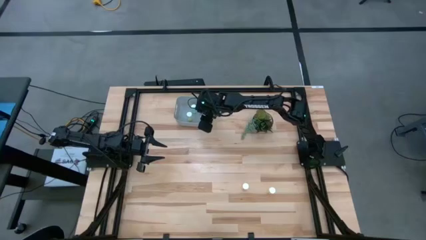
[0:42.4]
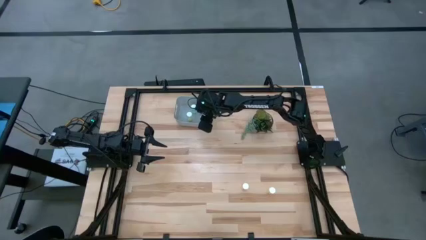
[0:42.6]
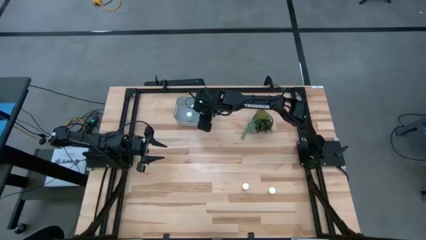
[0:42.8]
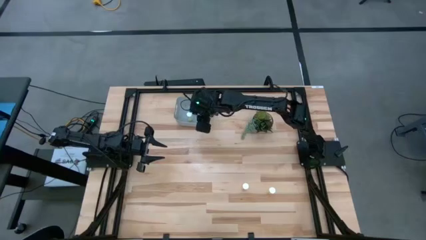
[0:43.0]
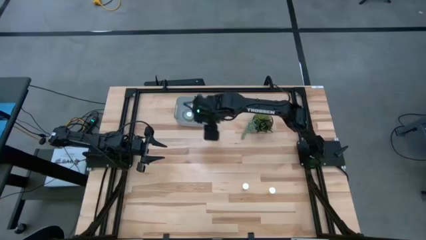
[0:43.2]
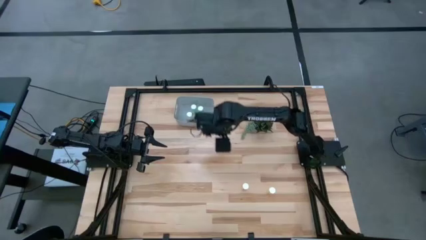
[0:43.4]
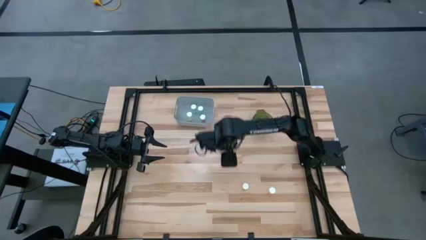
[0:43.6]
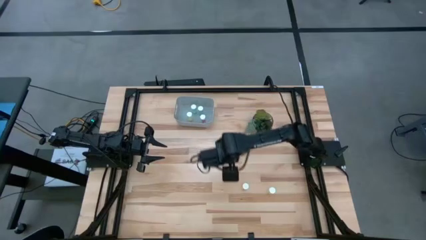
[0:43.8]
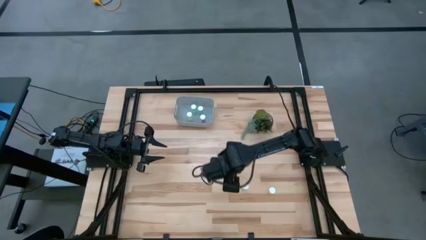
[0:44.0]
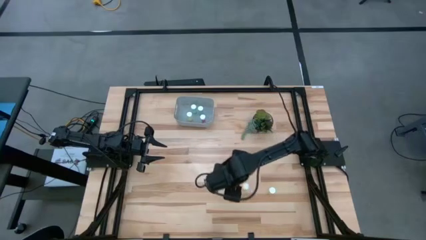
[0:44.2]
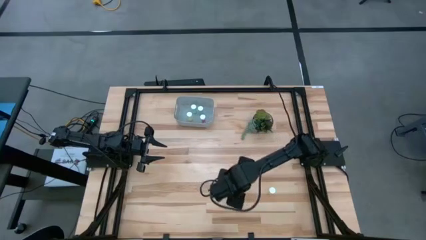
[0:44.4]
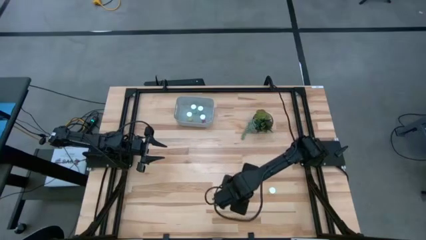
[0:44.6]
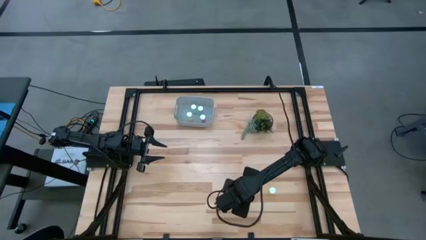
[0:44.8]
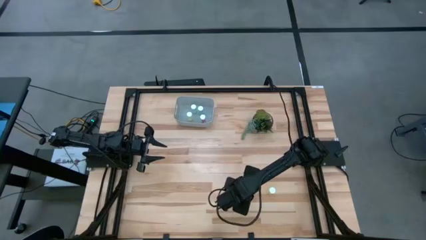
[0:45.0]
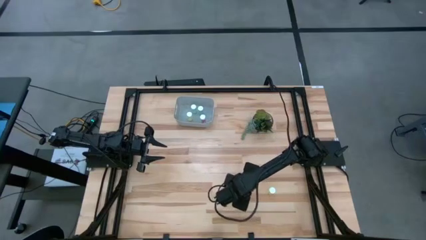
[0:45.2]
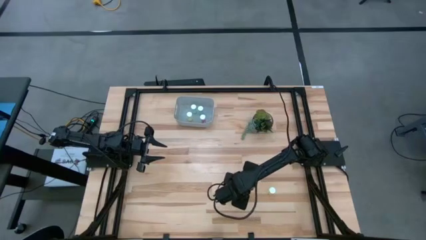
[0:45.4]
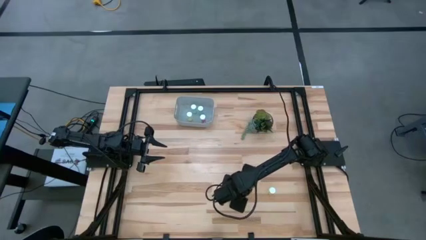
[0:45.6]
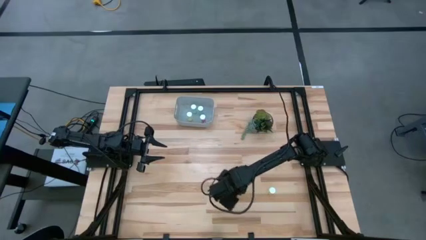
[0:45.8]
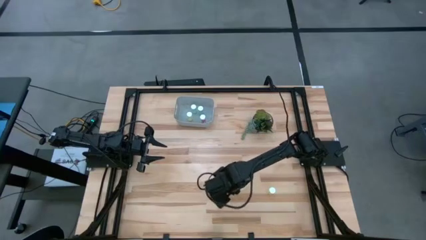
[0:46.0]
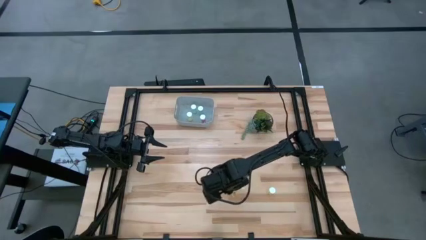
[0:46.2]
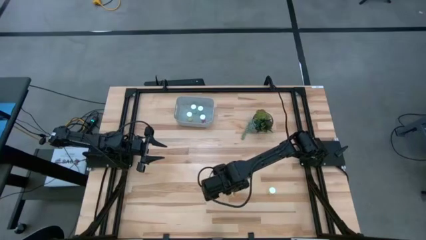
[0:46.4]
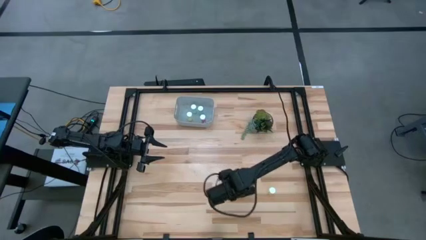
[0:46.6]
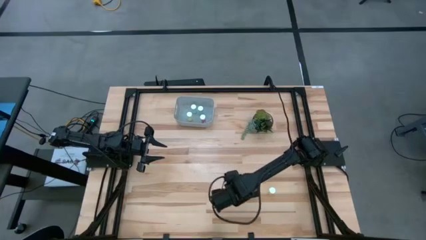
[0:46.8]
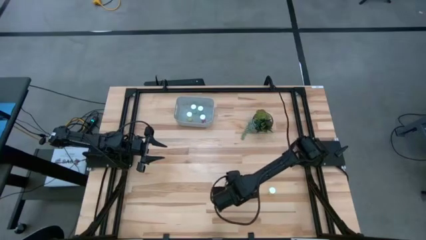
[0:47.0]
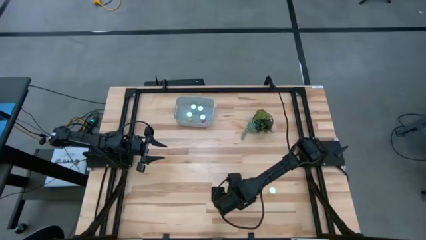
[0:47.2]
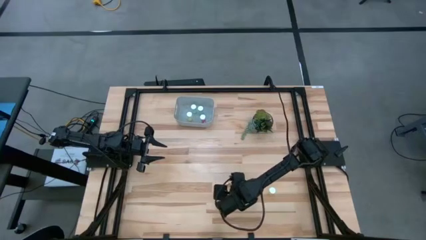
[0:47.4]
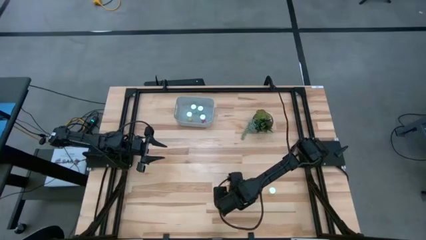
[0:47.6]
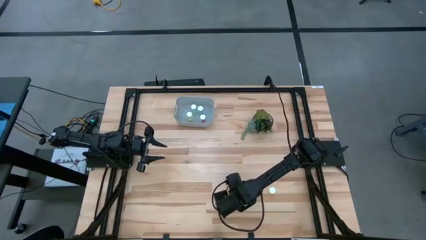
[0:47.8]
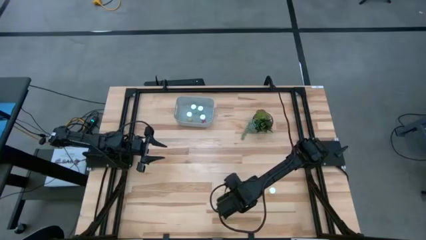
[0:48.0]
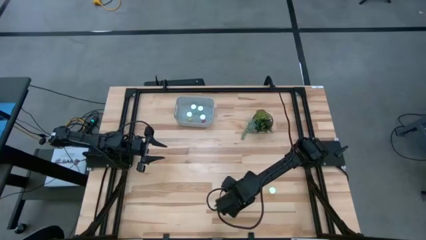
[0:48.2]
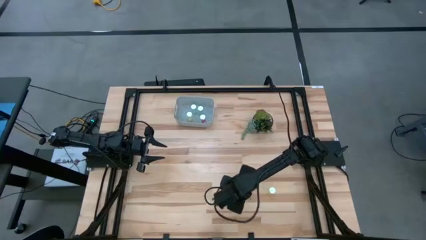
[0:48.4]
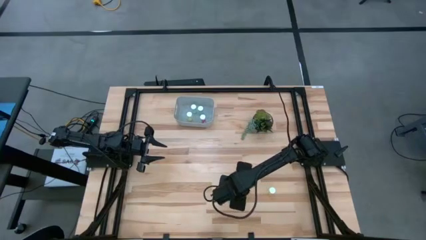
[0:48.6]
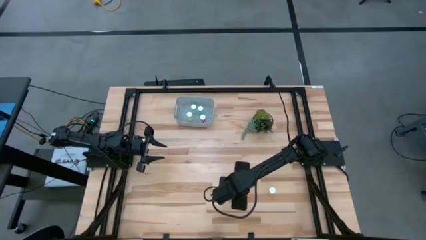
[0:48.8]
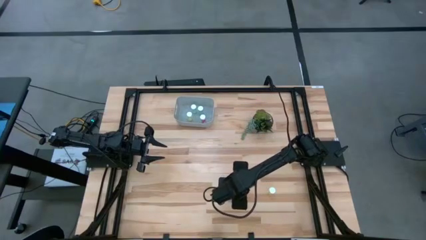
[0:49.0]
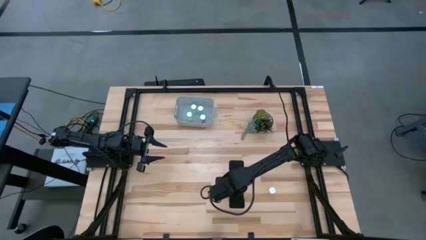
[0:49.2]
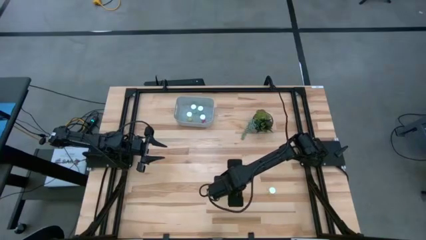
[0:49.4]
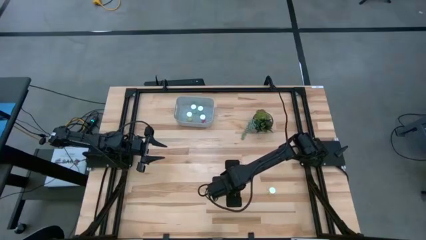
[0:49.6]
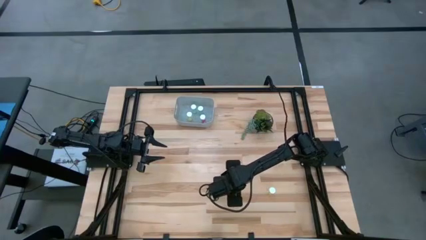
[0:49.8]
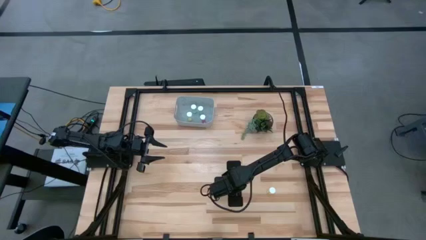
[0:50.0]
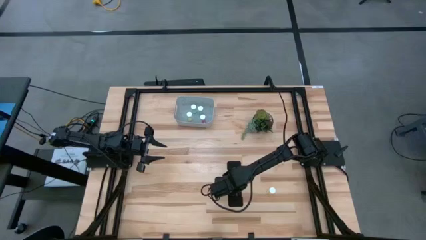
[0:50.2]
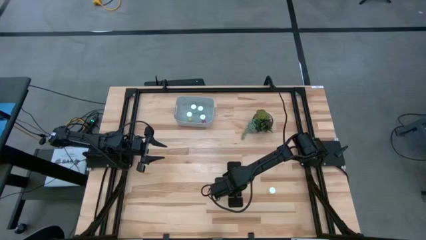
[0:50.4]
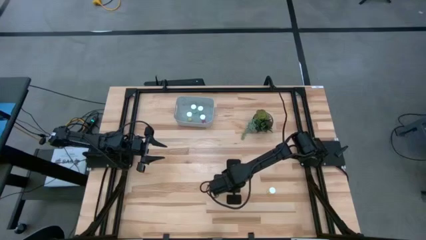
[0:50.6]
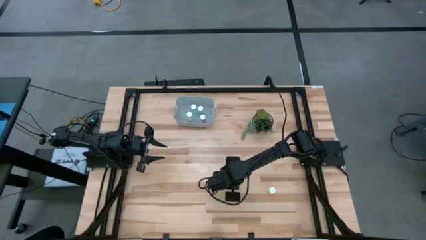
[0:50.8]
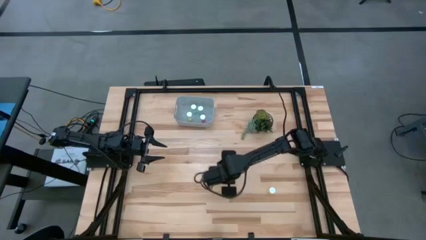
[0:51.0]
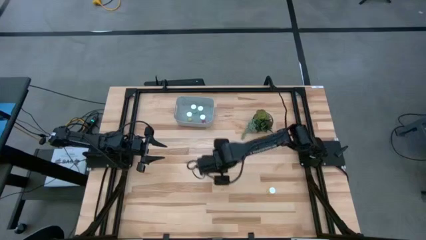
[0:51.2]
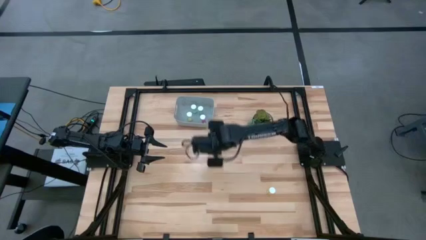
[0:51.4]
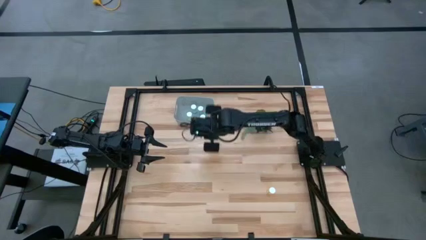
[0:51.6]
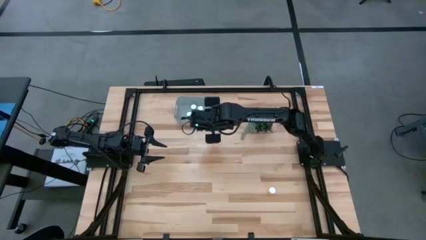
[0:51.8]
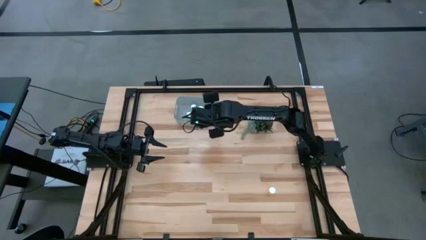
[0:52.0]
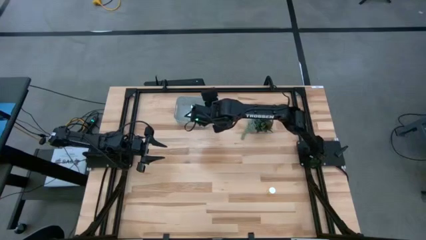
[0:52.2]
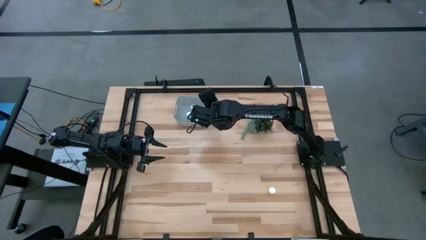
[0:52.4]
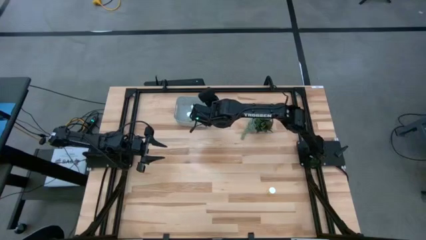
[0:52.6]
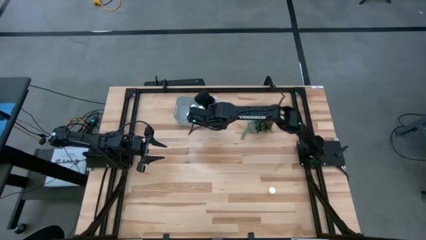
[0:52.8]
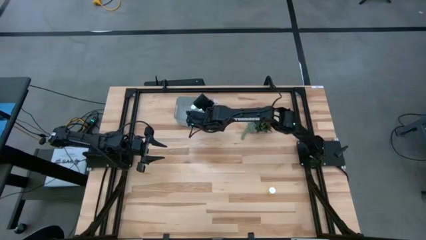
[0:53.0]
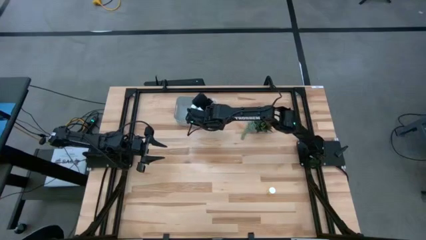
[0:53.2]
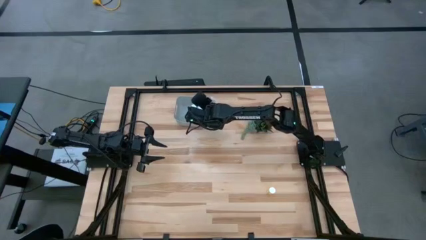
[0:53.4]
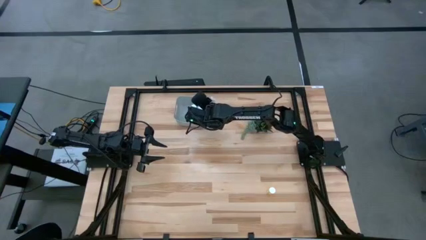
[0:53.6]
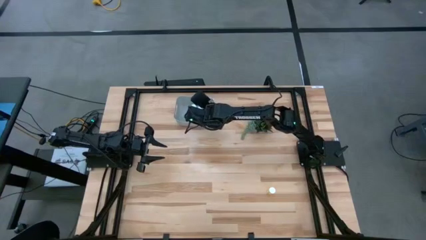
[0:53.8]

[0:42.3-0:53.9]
Task: Pick and place pill bottles into a basket
Put the left yellow pill bottle into the gray container

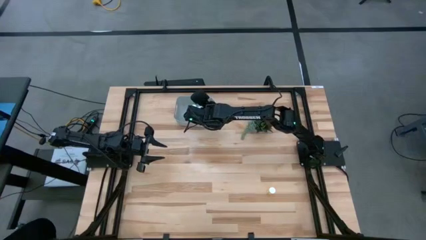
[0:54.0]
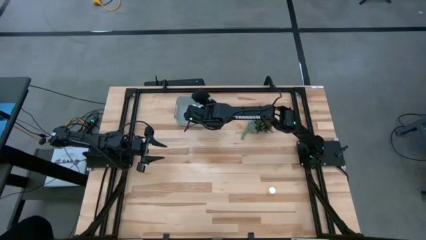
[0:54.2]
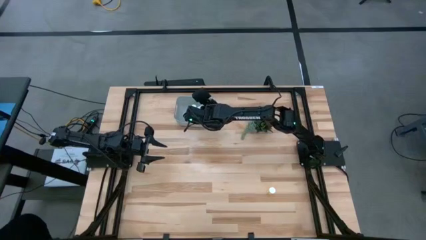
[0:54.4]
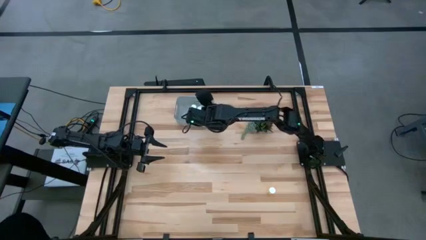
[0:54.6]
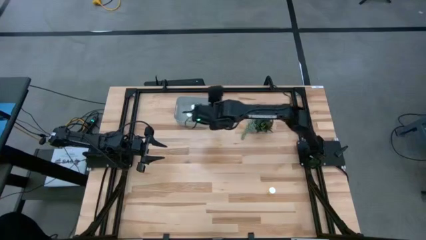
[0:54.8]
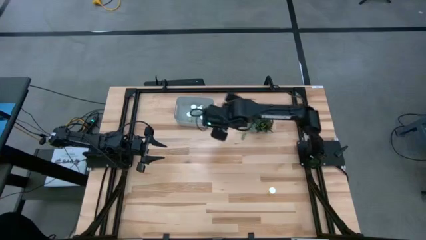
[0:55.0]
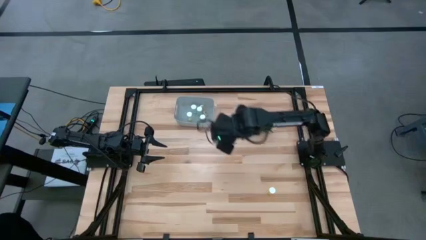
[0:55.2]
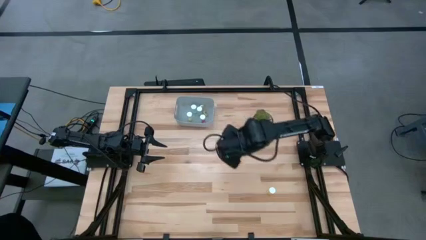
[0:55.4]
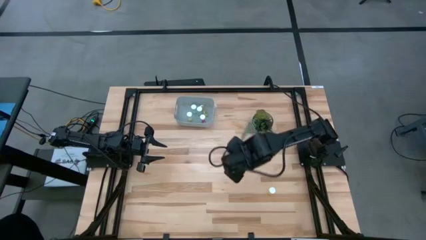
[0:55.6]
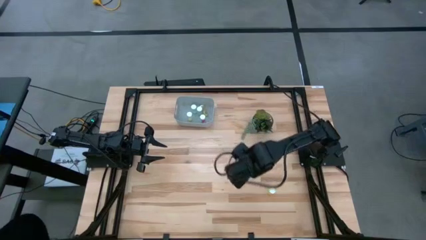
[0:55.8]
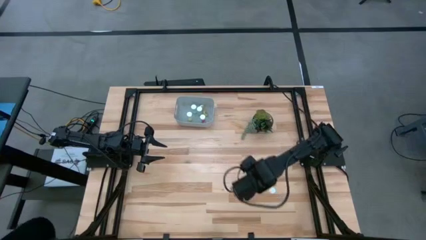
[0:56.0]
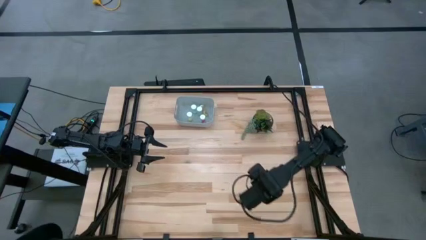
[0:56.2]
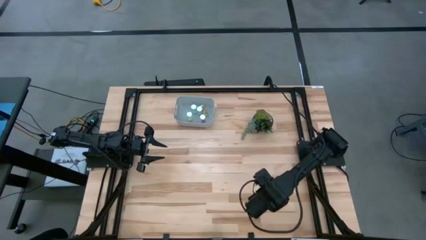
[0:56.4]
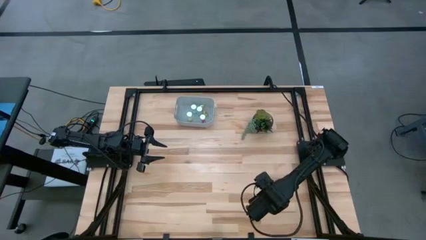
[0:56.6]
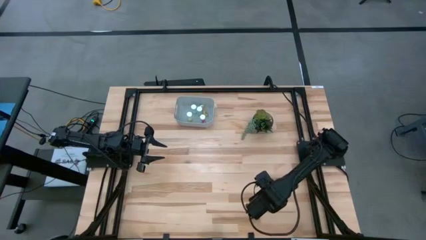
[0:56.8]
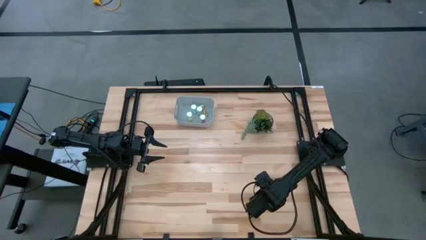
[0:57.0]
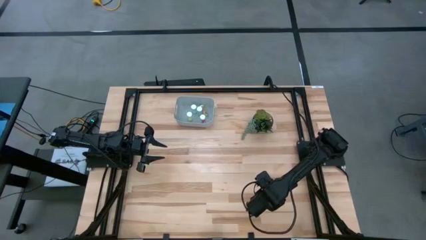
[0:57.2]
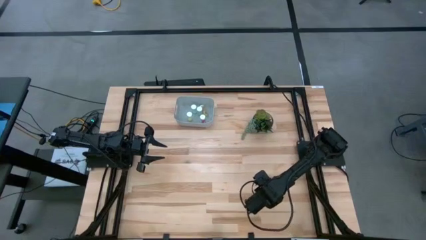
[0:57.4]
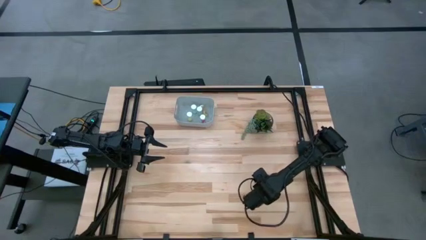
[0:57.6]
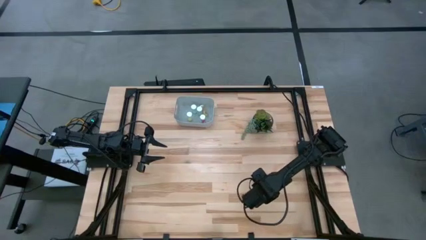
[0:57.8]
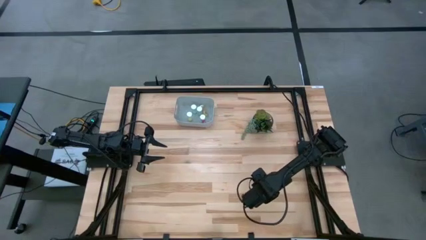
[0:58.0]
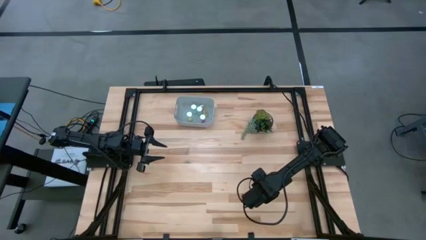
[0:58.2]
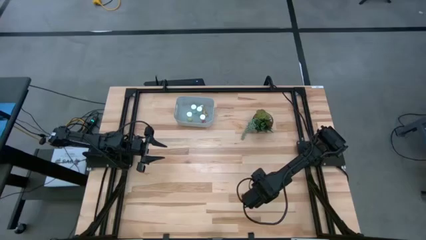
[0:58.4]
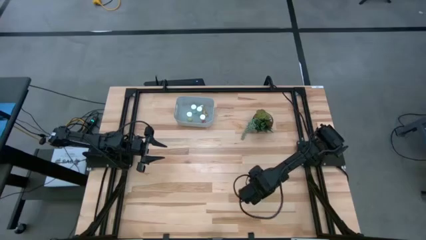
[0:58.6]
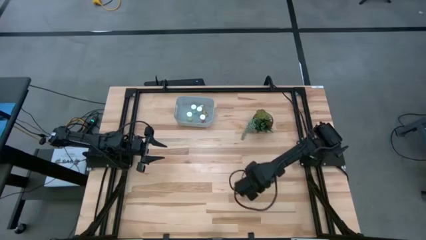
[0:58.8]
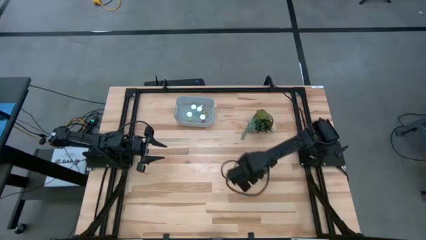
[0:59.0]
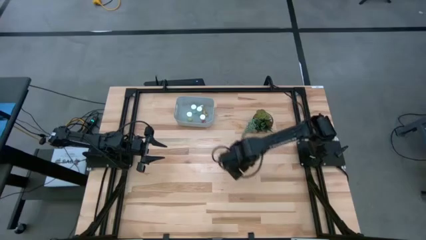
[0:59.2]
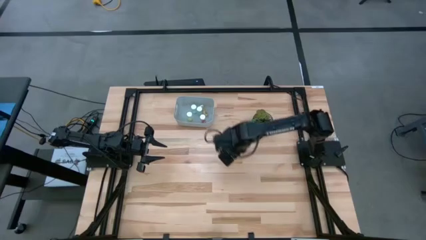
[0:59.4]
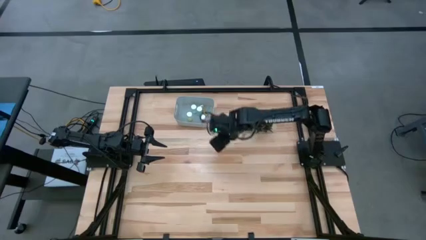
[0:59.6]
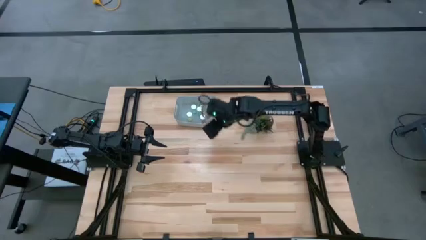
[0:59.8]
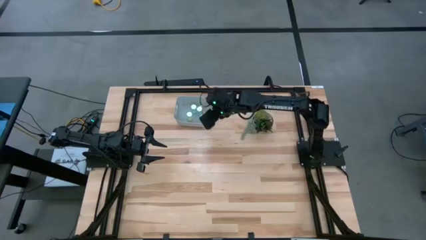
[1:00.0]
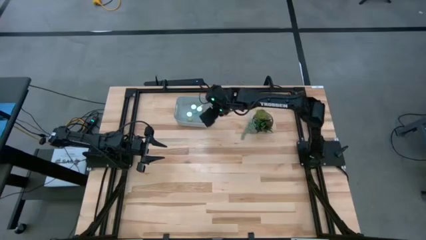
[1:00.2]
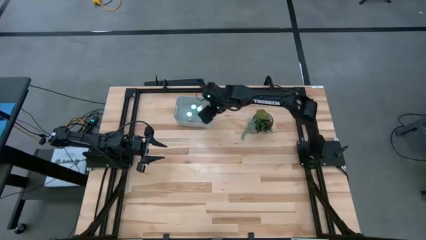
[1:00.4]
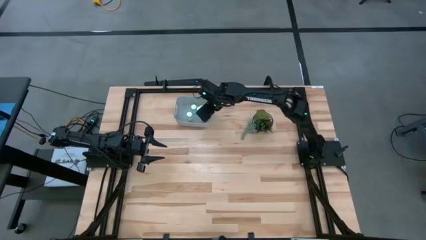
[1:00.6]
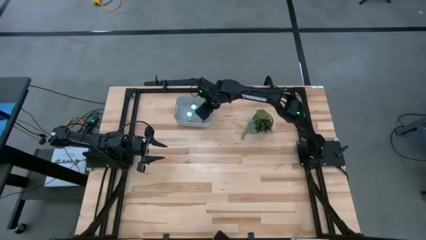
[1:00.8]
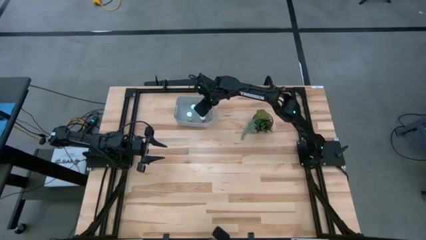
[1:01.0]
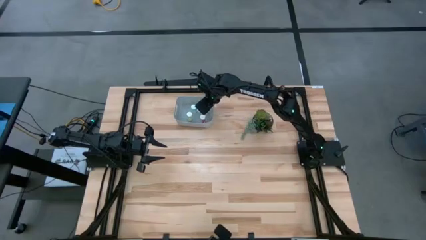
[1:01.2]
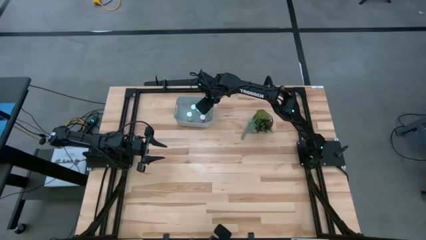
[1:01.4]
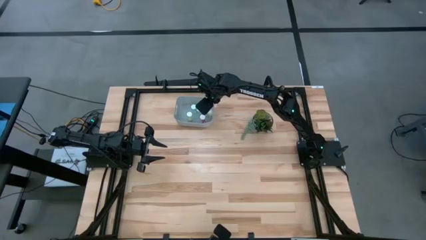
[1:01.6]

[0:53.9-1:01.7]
Put the yellow pill bottle into the gray container
